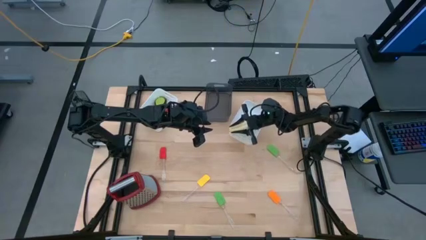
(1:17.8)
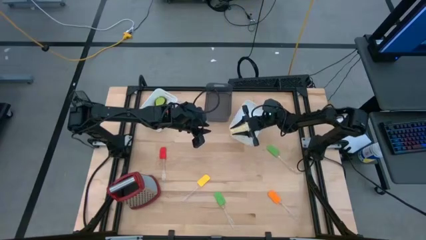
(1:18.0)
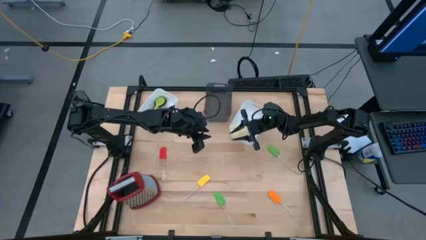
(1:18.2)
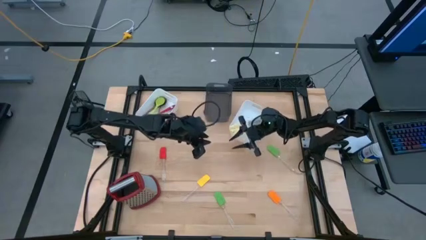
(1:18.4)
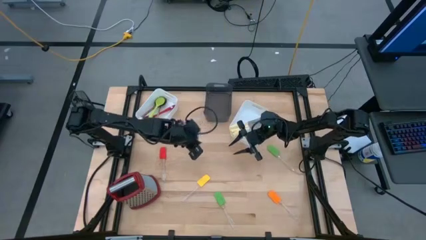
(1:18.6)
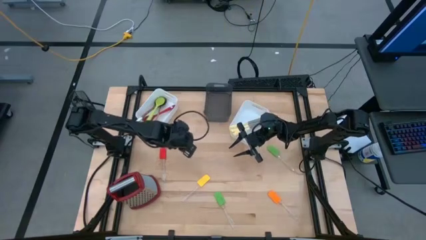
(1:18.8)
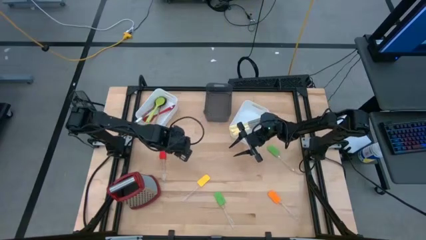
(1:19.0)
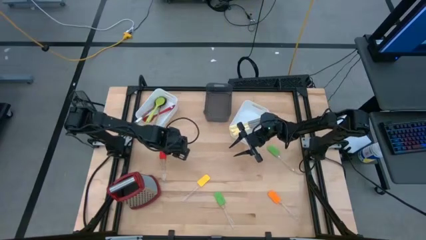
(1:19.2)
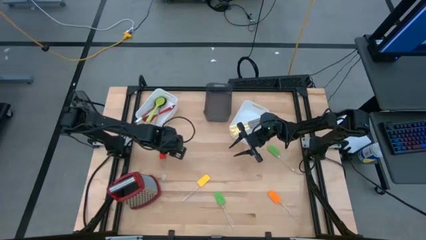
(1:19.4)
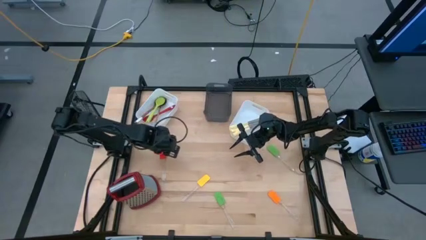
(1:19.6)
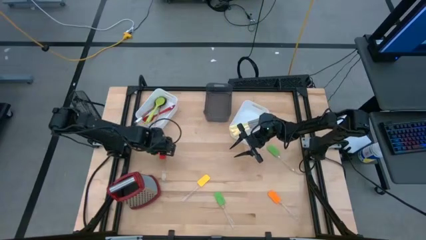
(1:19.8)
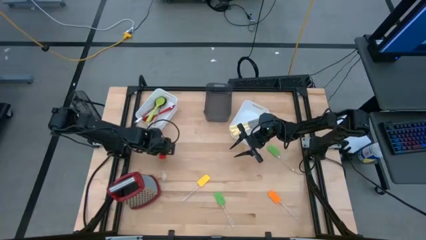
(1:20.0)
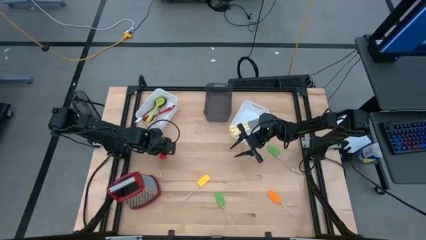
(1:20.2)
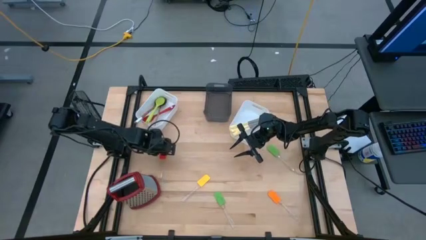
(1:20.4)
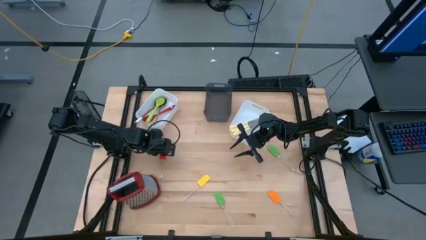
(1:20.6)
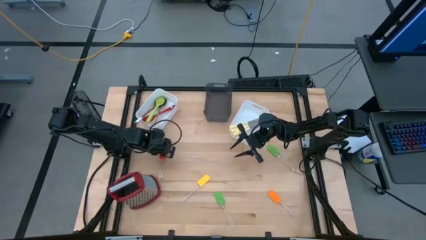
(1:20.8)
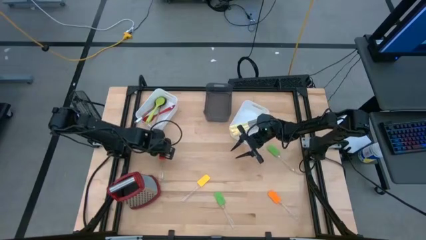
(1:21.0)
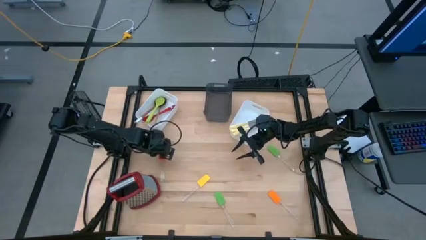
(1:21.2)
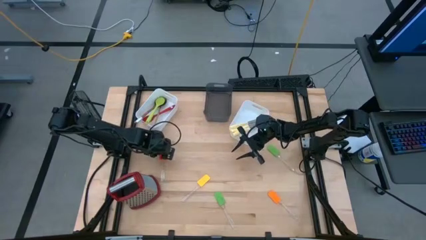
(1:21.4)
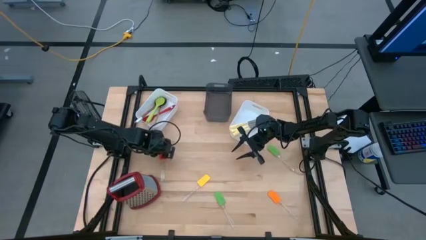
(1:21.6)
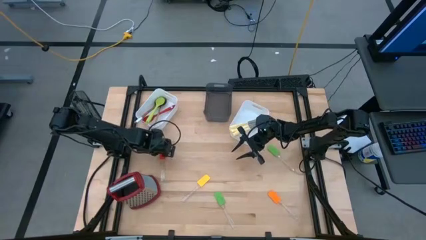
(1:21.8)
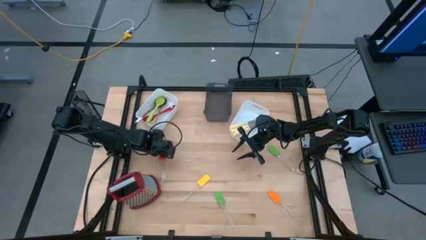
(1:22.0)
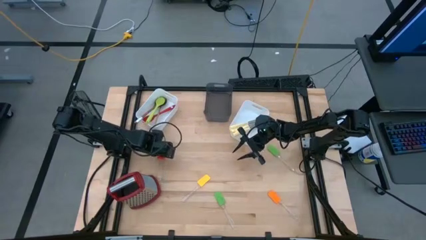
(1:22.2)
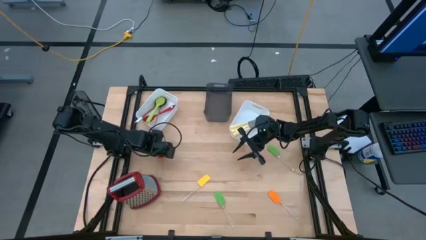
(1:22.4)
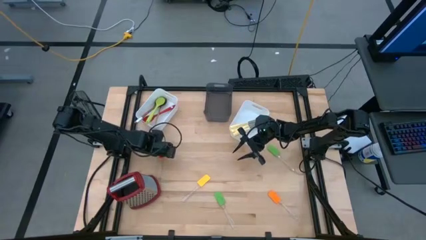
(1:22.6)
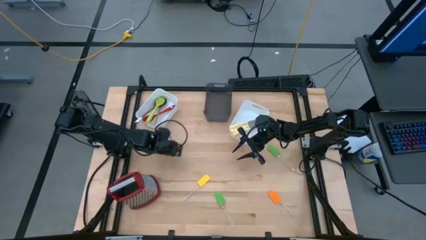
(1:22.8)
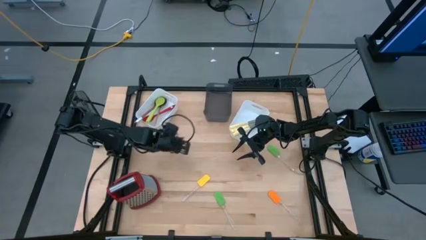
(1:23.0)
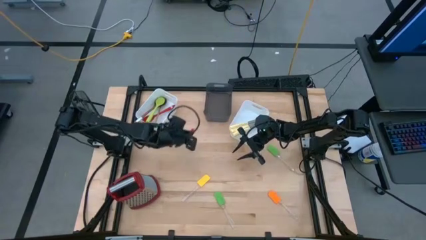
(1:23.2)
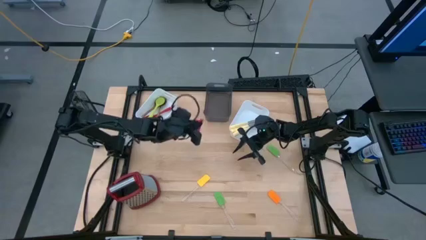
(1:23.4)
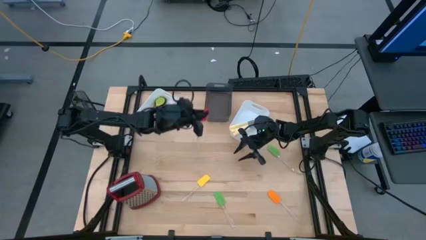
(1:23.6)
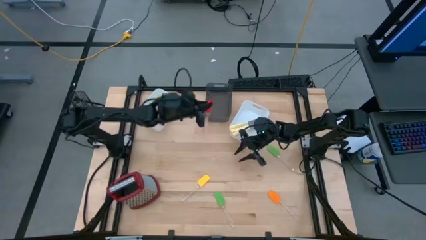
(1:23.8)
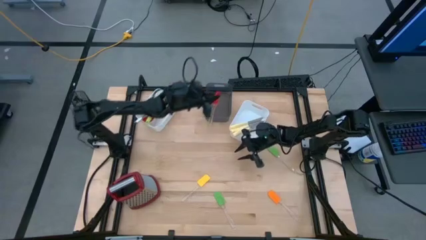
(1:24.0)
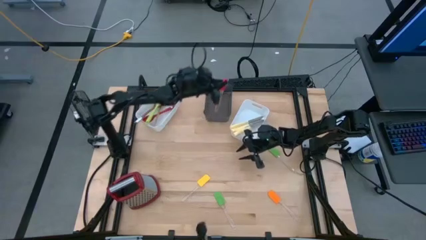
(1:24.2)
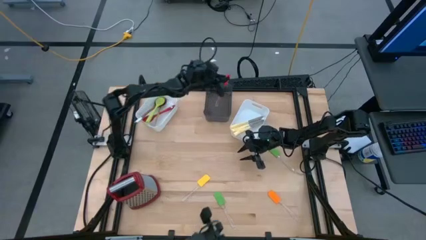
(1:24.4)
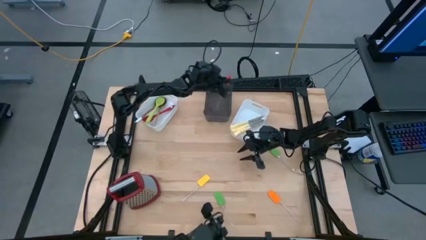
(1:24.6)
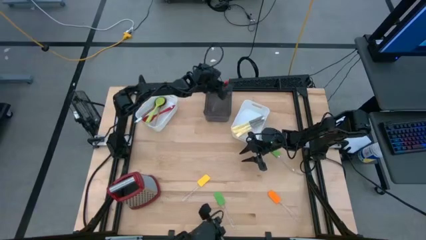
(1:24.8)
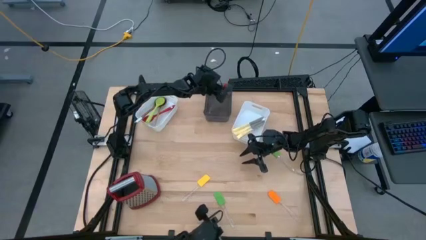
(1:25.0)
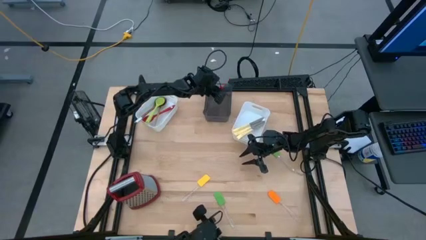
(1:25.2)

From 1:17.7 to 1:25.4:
Task: Pick & Place Kitchen Items
Put the red spatula into the black bin

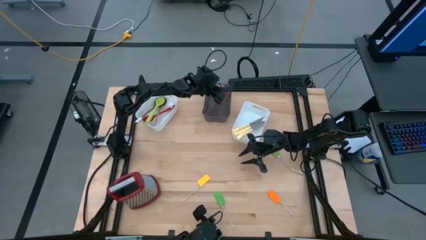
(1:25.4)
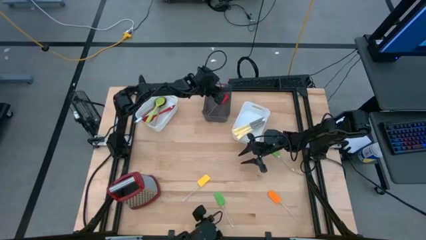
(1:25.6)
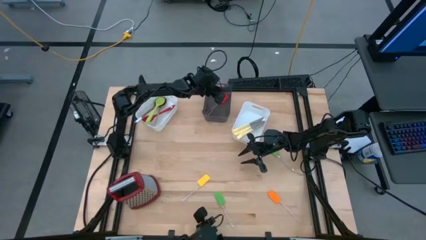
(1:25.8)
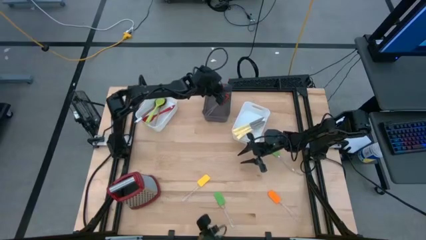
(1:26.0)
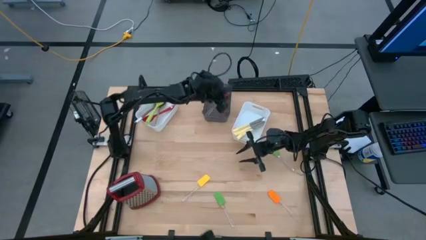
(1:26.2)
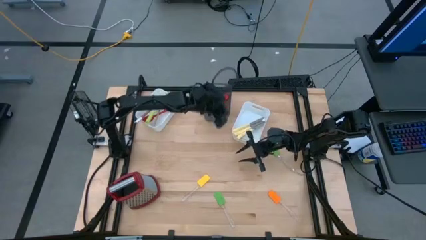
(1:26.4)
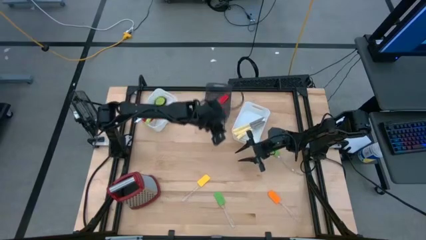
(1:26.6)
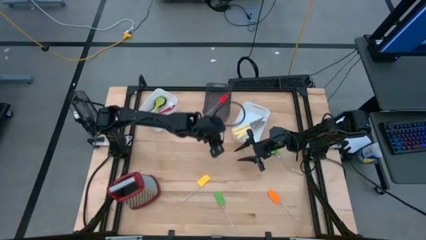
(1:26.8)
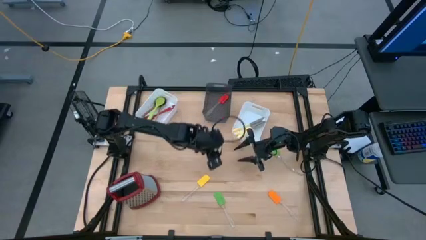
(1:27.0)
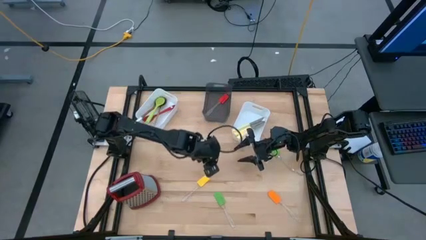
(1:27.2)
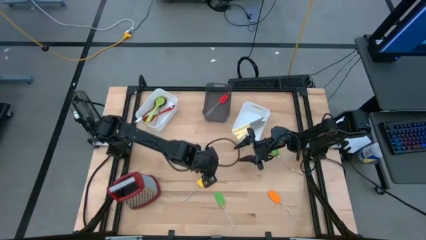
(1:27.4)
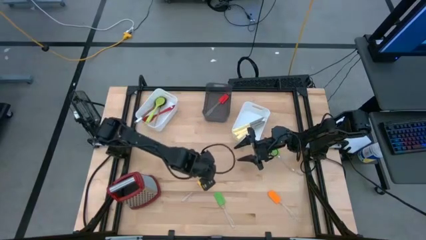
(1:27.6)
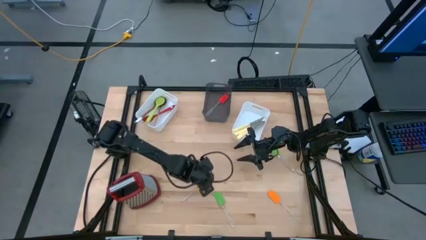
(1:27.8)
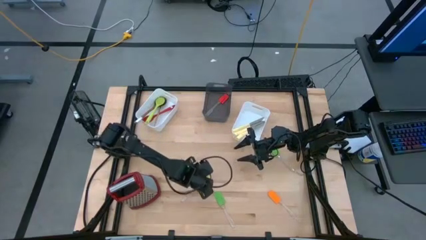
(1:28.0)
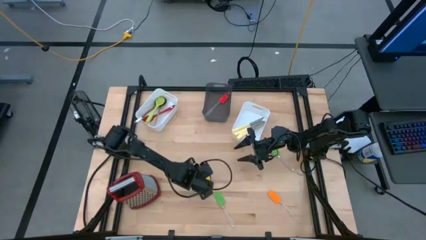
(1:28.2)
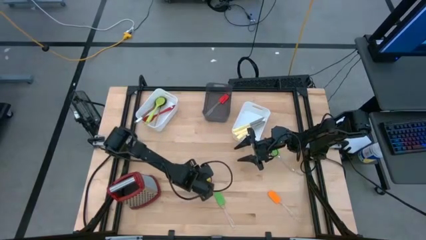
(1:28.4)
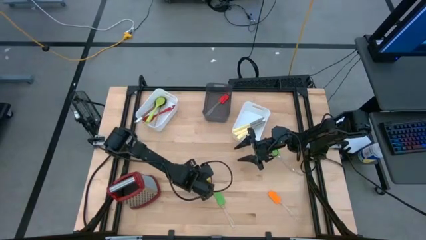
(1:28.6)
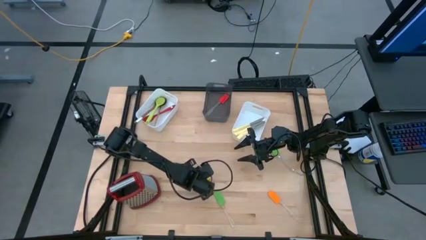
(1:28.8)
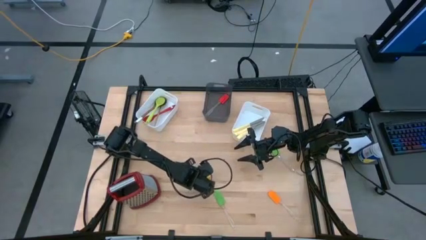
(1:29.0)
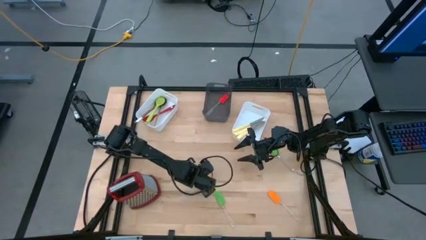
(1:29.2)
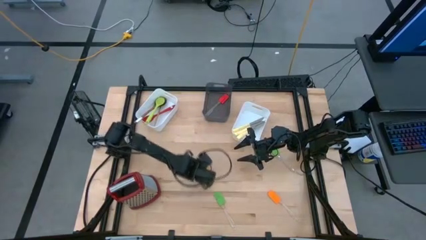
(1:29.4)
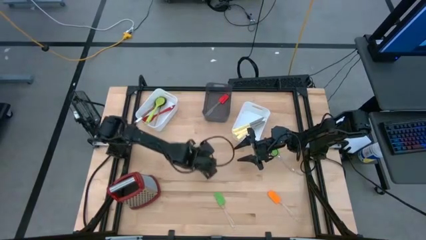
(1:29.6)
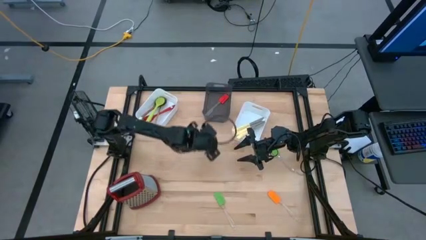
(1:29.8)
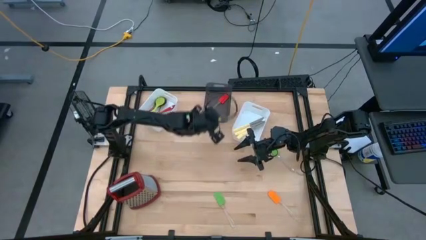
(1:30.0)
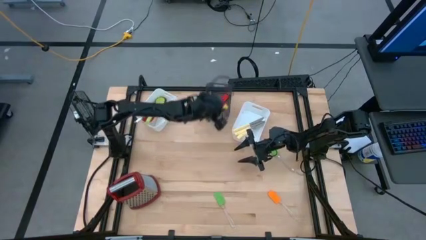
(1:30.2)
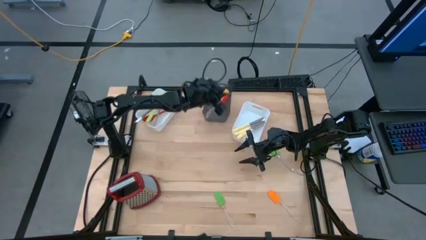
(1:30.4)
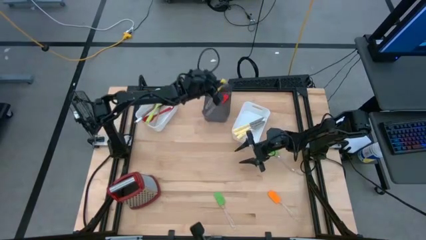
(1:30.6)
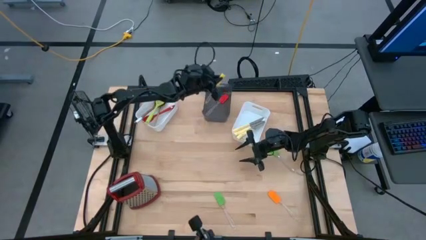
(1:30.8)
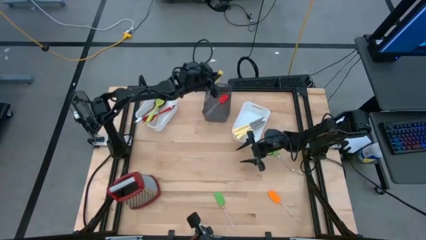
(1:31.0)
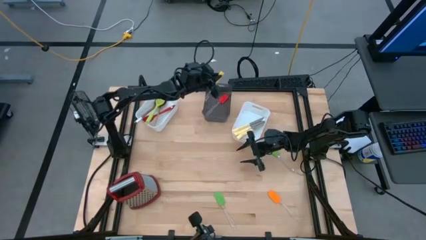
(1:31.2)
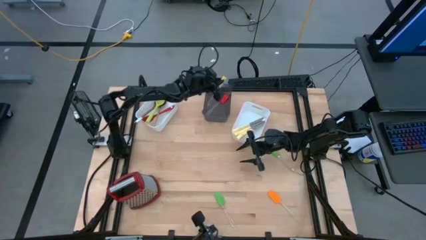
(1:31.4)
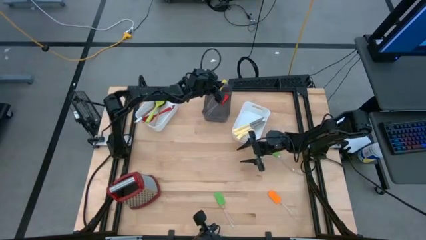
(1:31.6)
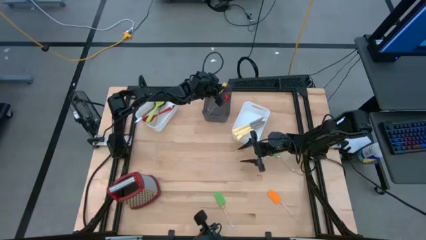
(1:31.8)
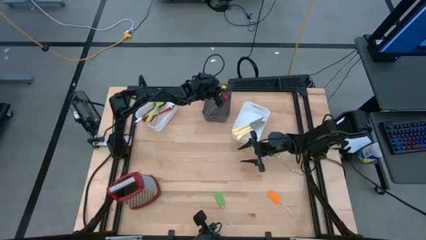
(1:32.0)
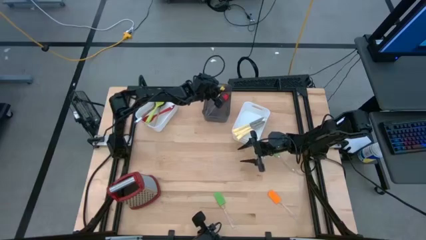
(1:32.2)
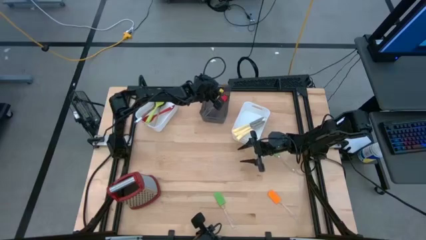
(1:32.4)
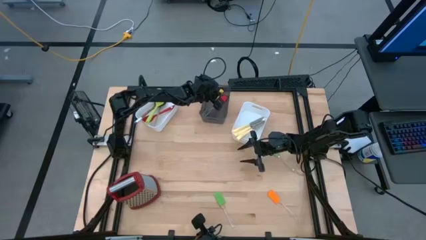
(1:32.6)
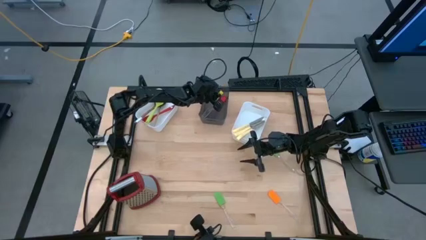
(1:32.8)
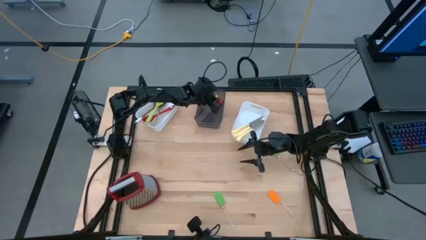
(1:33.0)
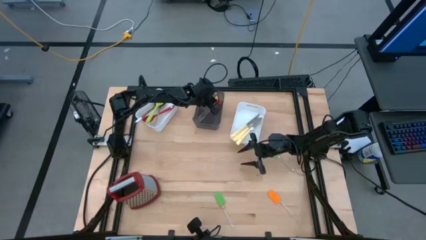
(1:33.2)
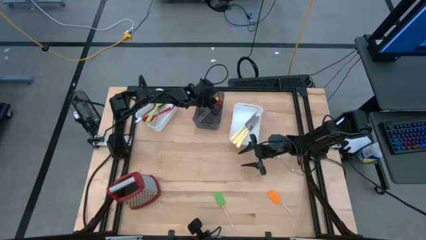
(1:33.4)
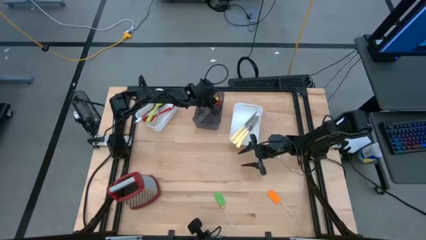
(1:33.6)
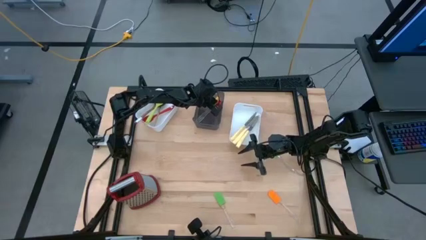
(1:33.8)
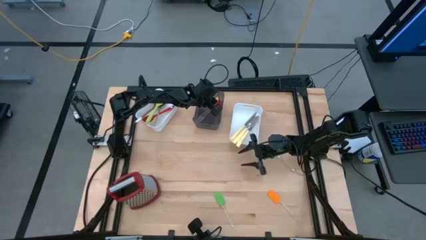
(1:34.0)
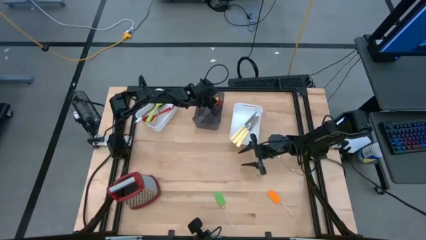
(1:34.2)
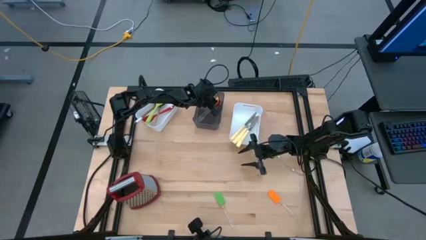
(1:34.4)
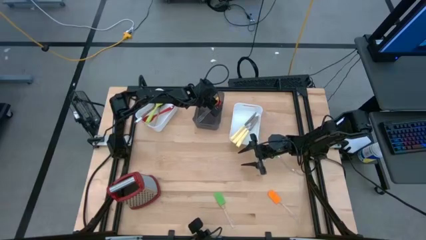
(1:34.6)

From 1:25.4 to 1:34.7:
Put the yellow spatula into the black bin
